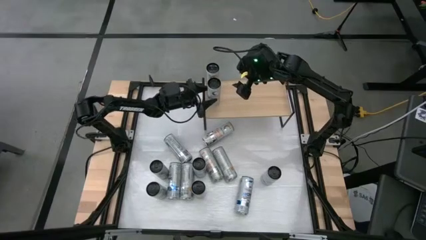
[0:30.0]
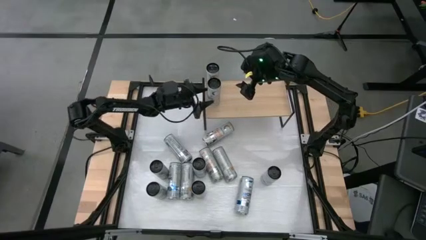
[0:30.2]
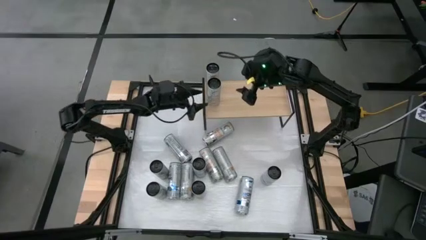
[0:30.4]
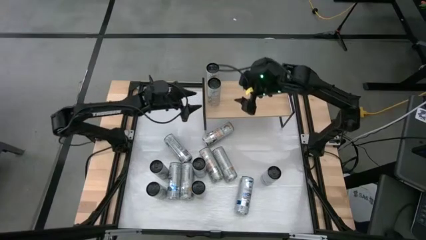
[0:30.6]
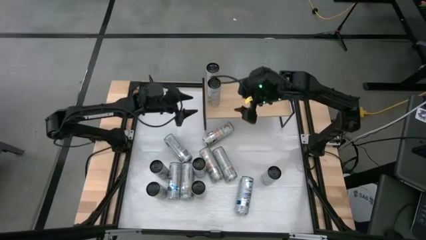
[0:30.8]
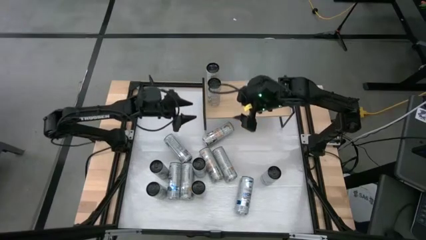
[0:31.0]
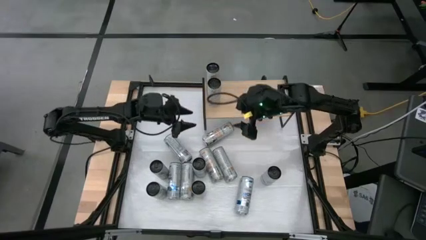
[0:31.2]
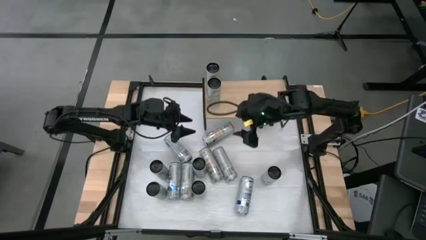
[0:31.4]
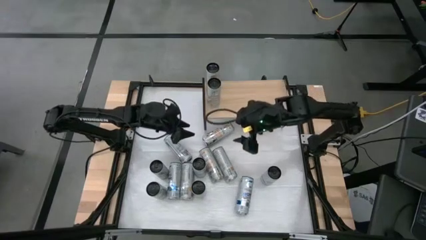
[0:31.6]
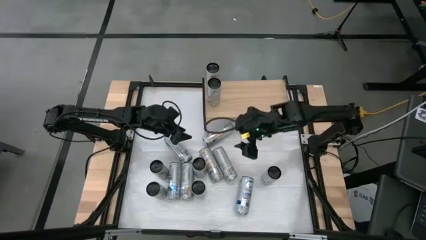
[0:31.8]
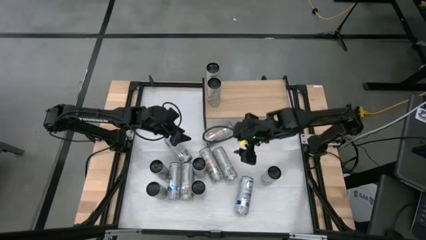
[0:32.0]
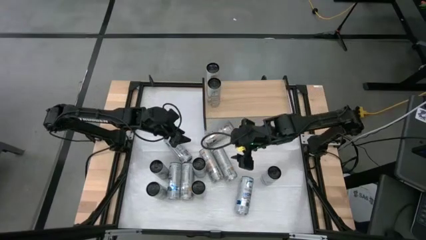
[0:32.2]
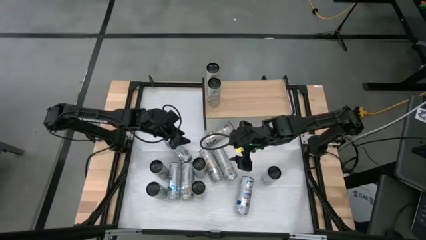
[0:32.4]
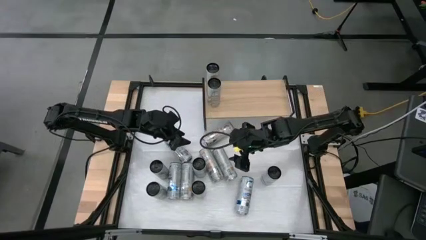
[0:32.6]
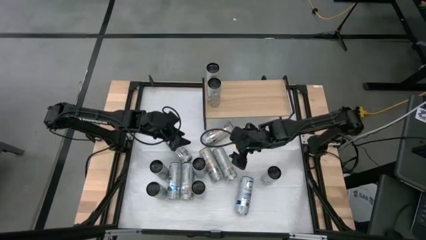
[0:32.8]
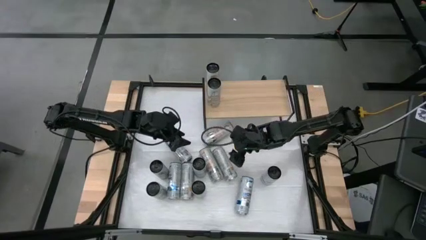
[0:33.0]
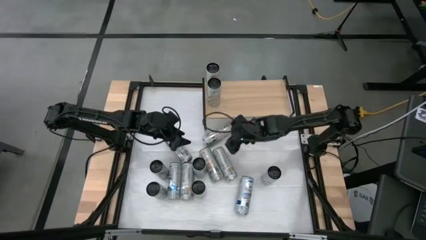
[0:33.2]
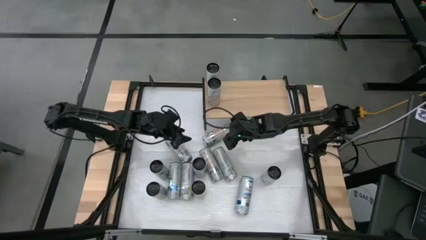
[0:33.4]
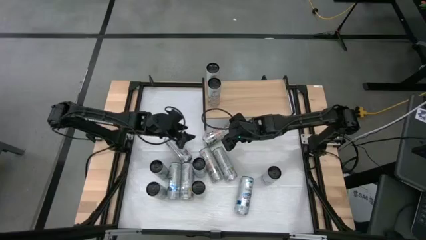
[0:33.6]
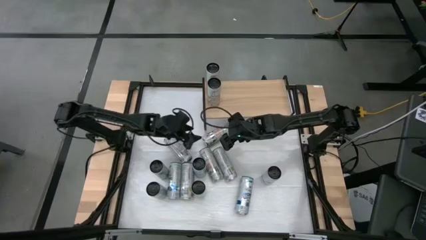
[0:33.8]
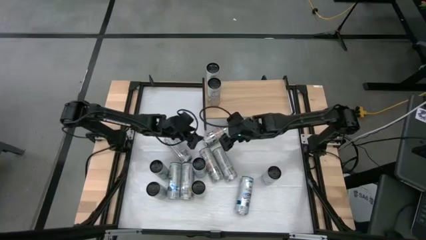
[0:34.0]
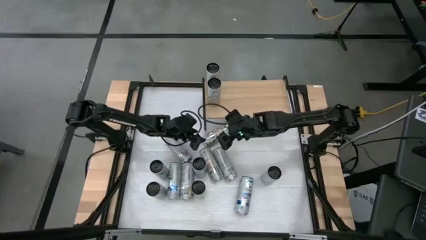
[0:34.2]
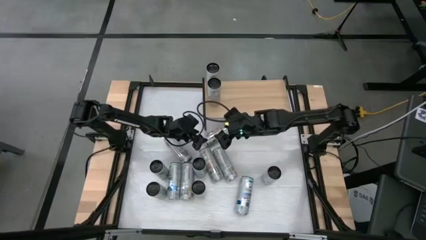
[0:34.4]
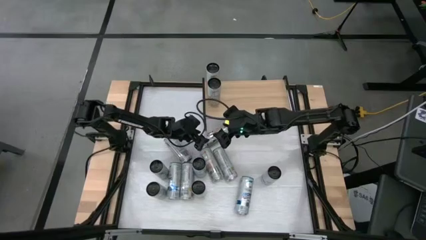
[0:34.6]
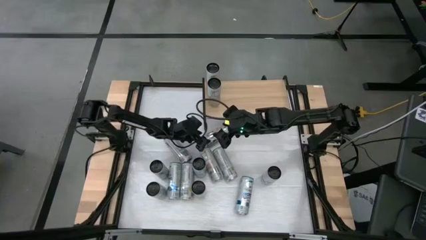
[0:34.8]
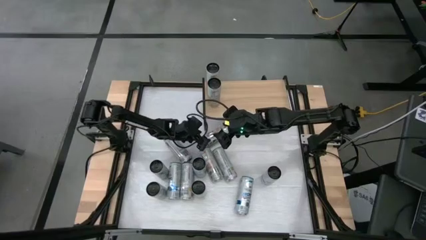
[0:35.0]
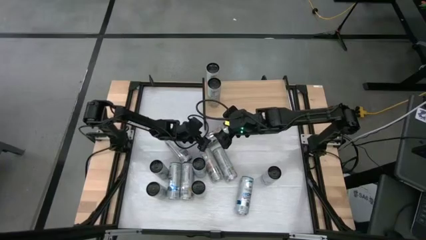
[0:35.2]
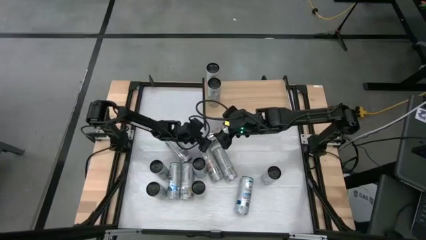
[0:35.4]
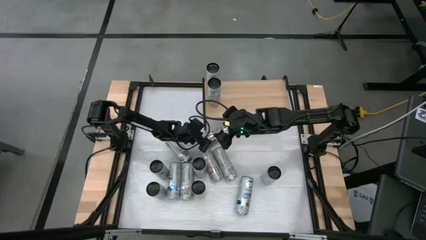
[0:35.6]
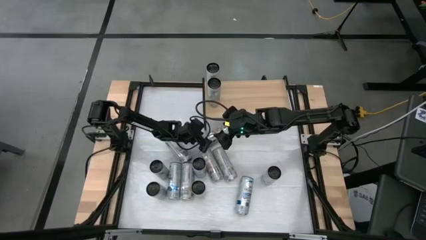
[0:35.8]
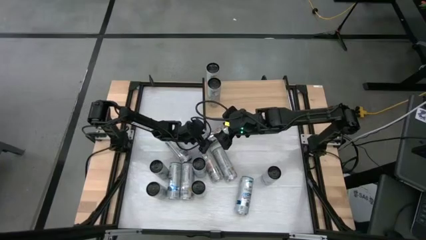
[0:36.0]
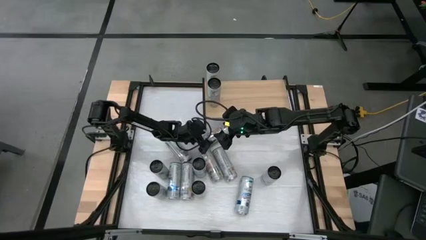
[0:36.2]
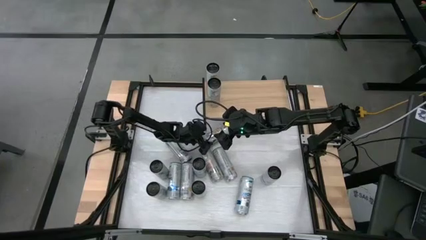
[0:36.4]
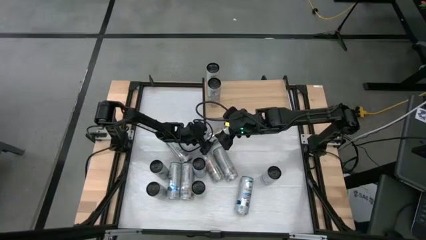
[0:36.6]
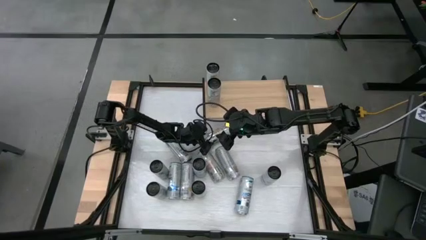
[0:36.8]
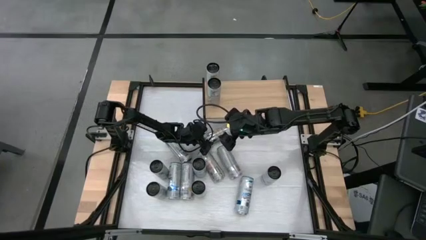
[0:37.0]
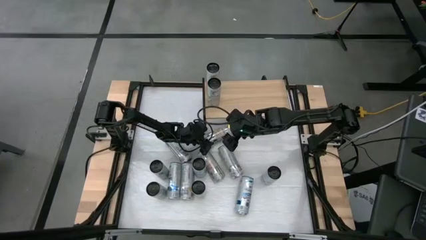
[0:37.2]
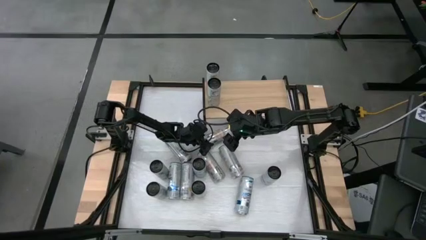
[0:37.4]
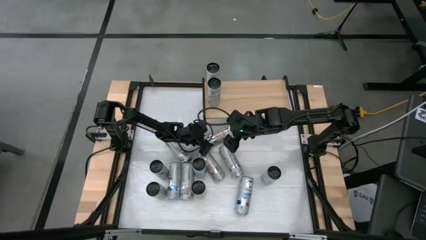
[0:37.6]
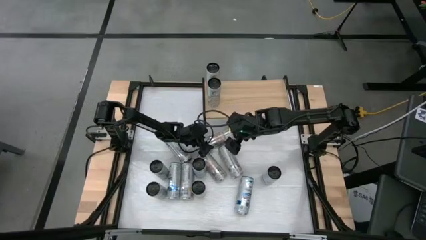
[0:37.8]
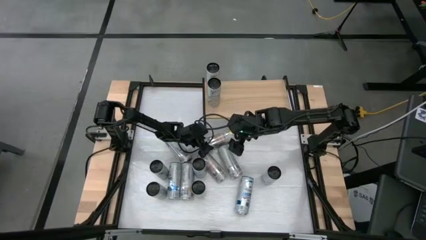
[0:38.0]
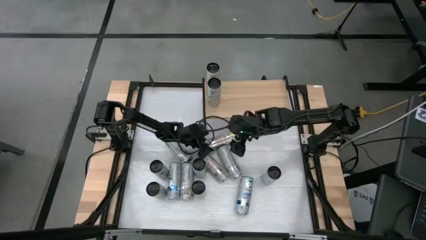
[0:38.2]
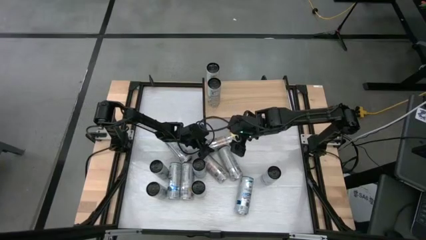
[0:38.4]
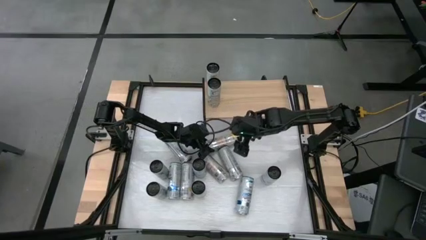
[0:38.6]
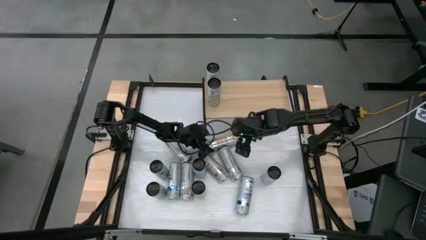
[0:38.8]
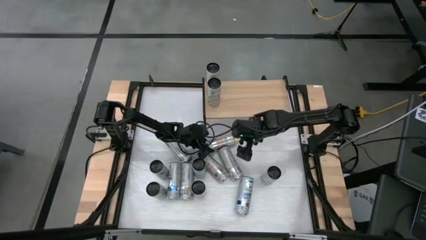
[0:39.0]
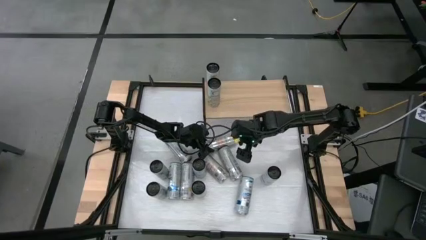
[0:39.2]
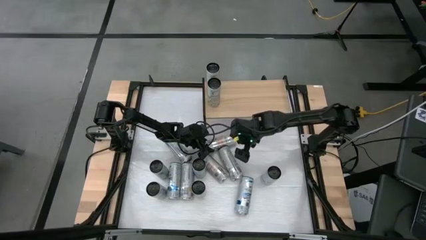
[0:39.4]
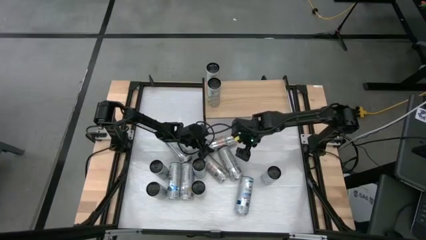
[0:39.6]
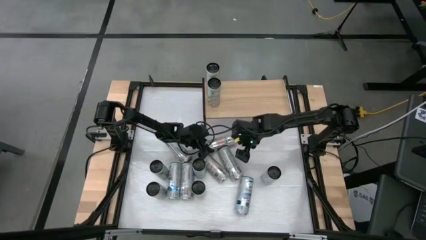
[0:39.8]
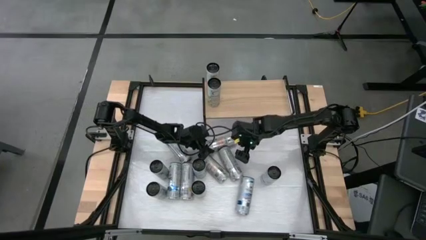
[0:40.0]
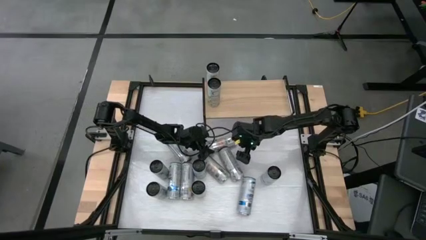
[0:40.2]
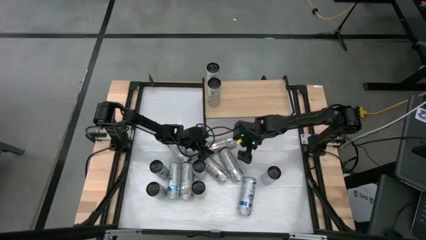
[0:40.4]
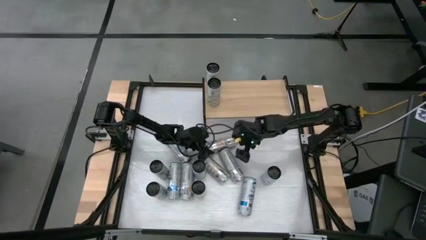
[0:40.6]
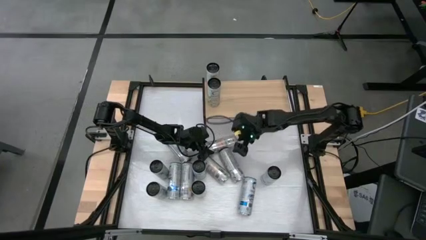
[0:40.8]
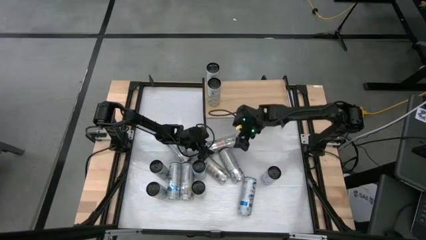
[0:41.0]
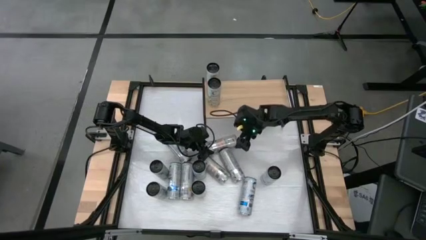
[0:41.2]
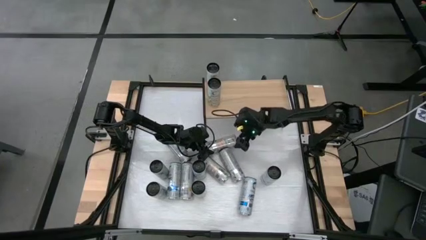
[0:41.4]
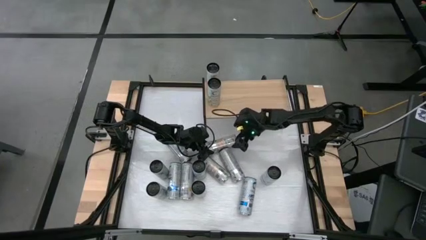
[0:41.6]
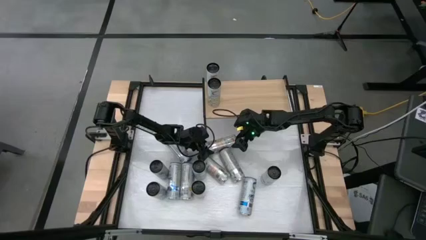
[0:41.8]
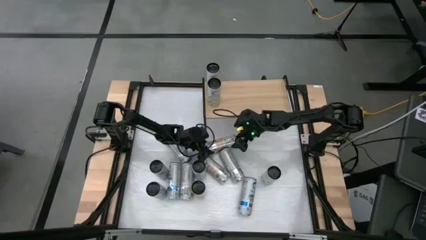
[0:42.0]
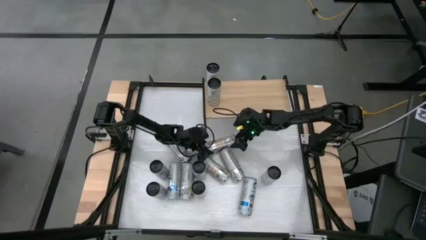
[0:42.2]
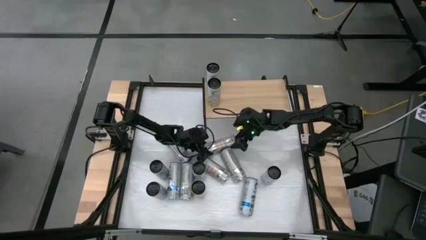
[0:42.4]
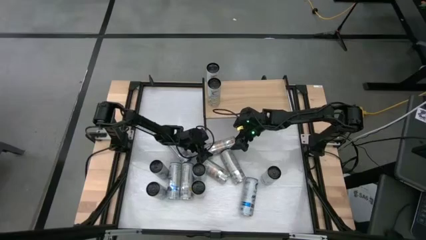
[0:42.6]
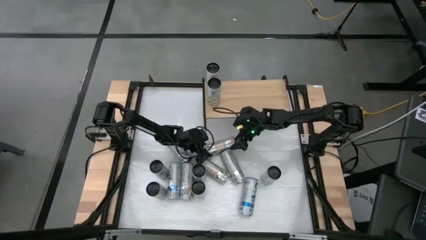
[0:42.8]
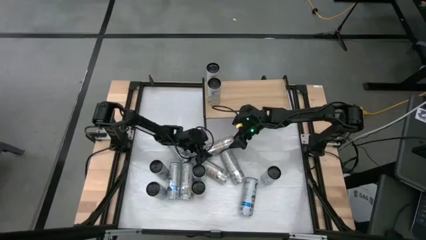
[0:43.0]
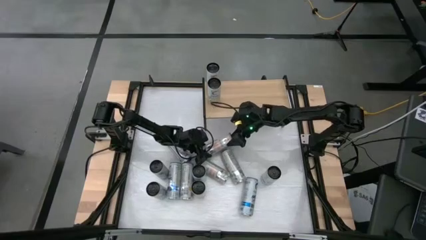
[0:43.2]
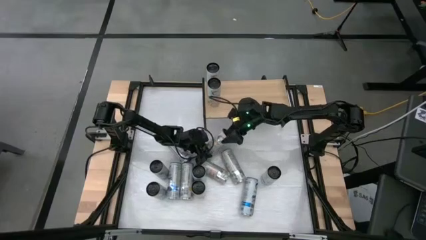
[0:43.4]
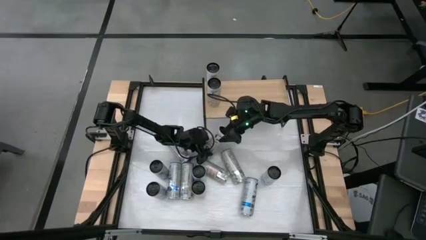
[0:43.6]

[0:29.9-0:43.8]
Task: Place canned beverage on shelf
Put the right orange soda can on the shelf aligned with the other orange soda cans
